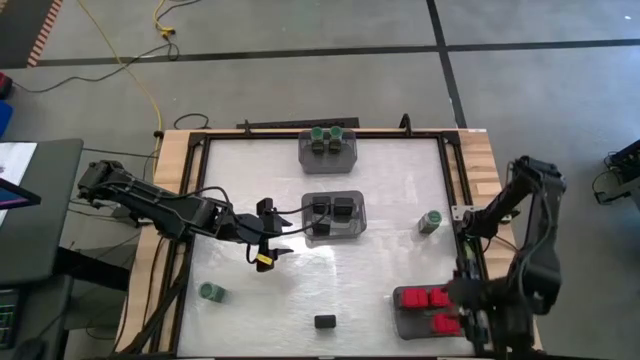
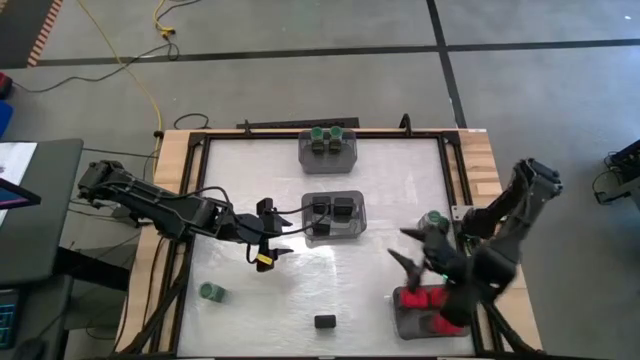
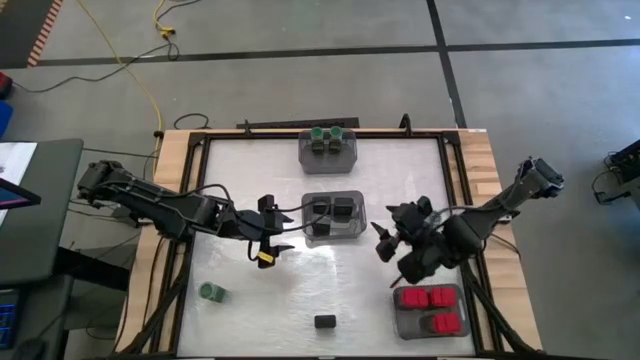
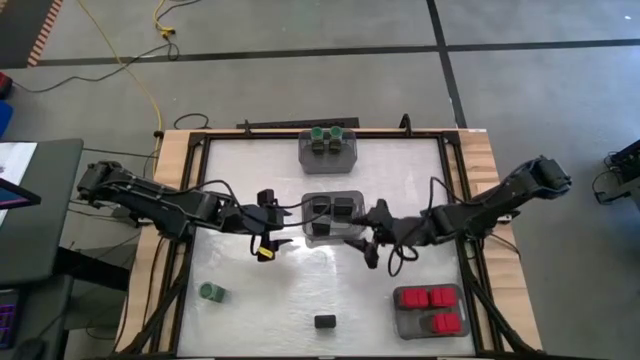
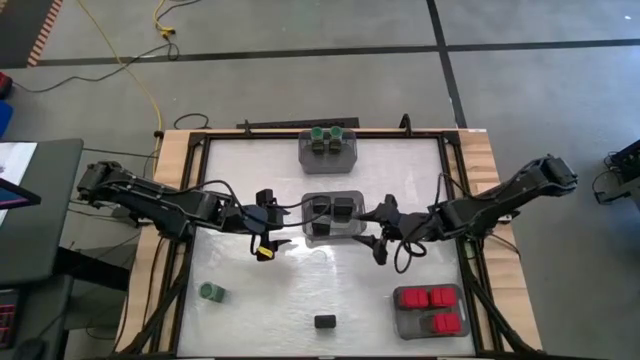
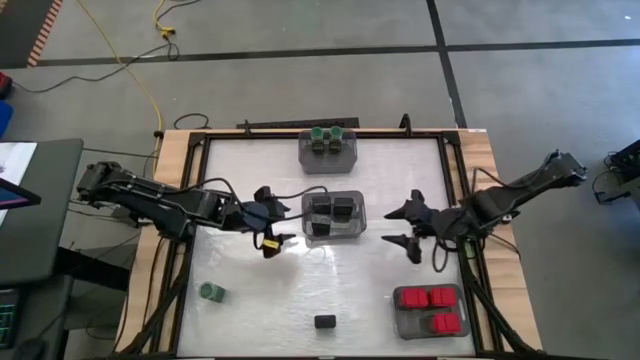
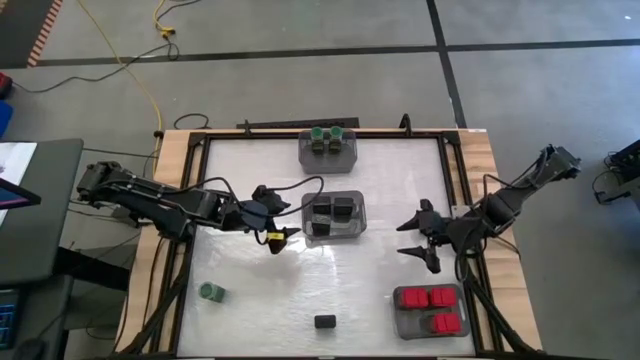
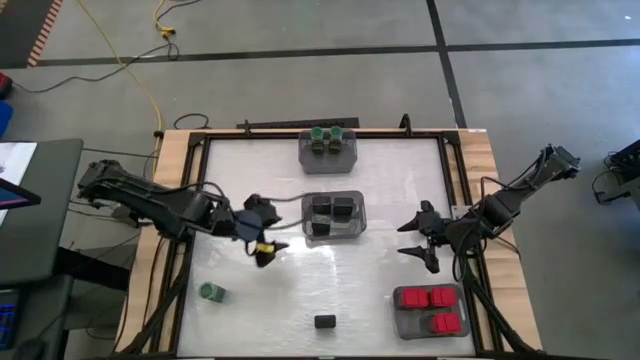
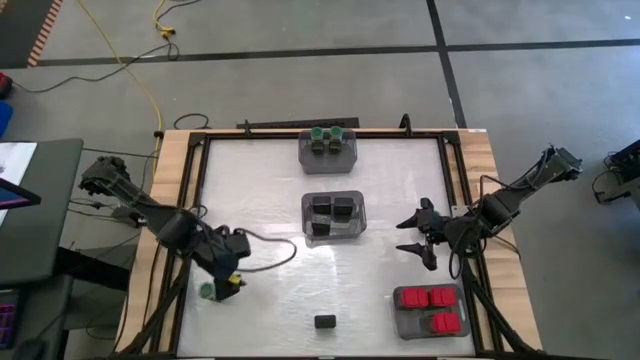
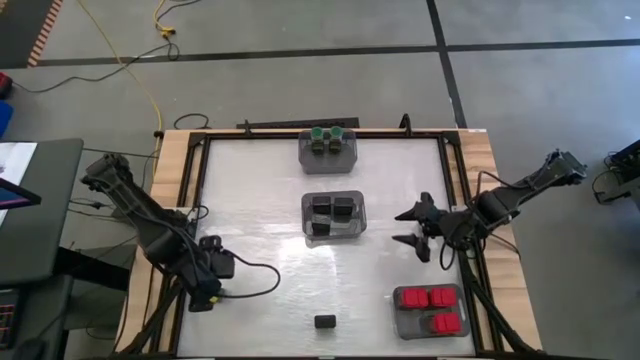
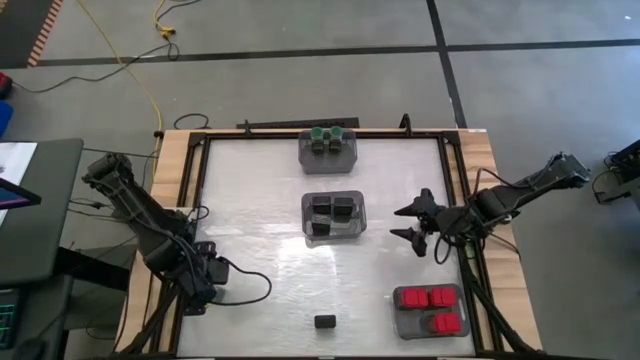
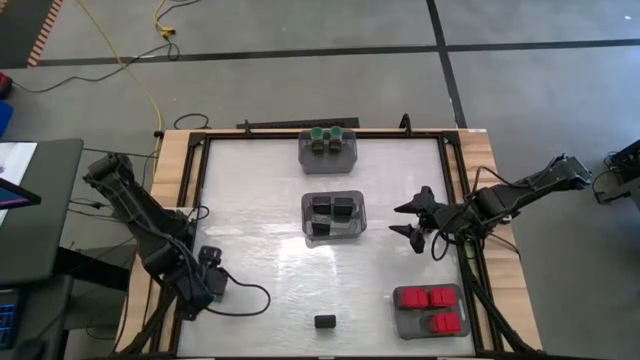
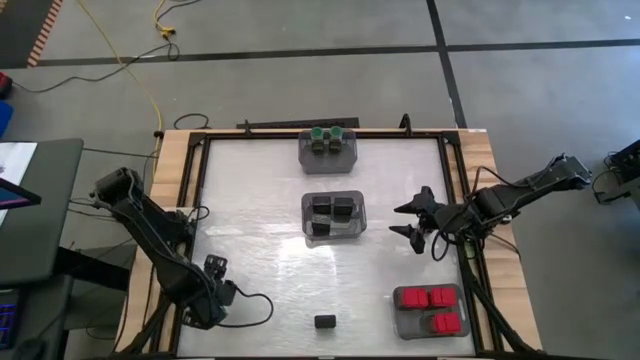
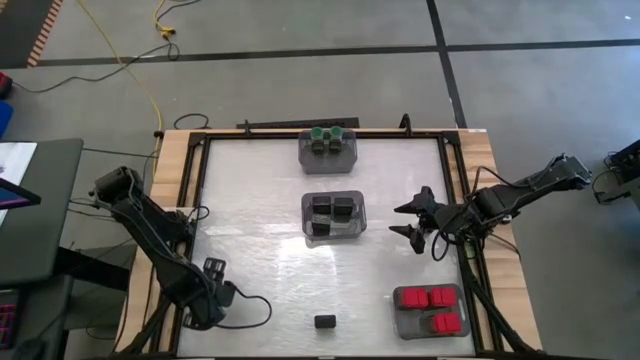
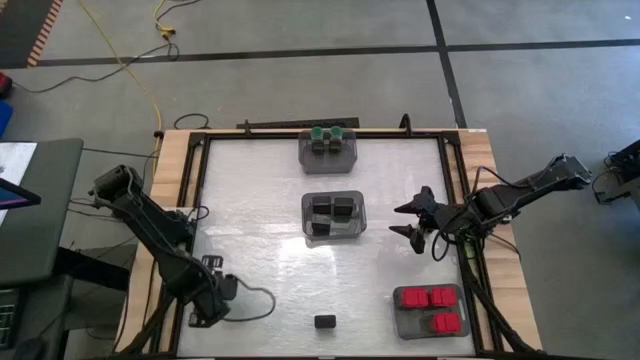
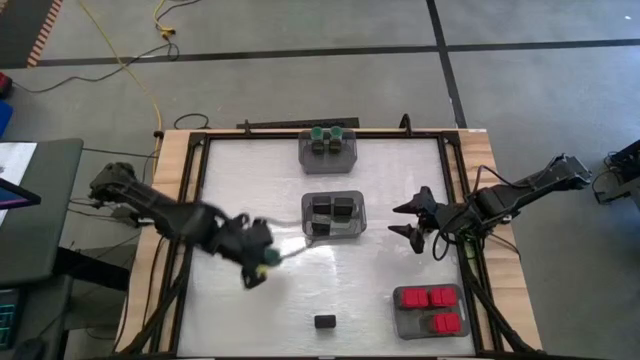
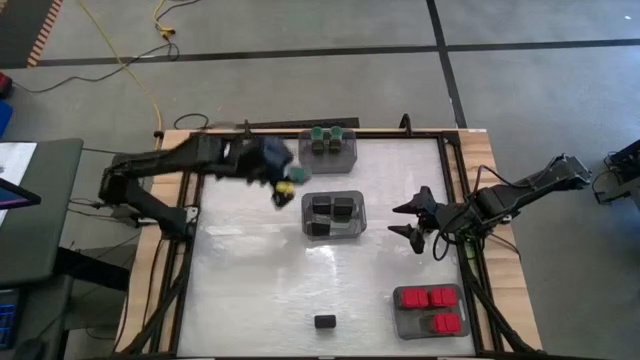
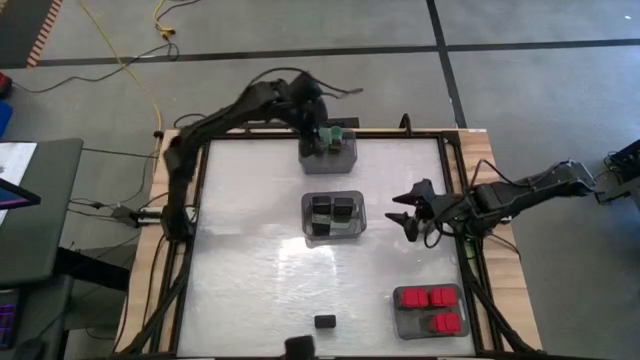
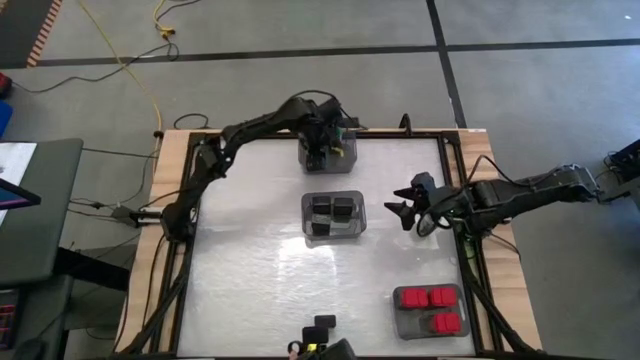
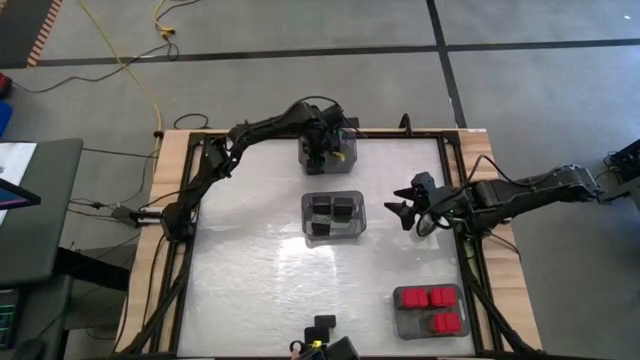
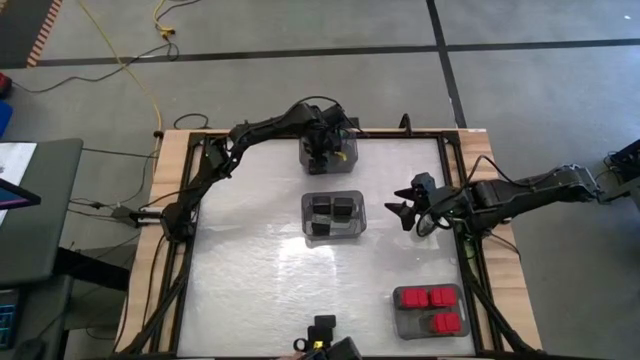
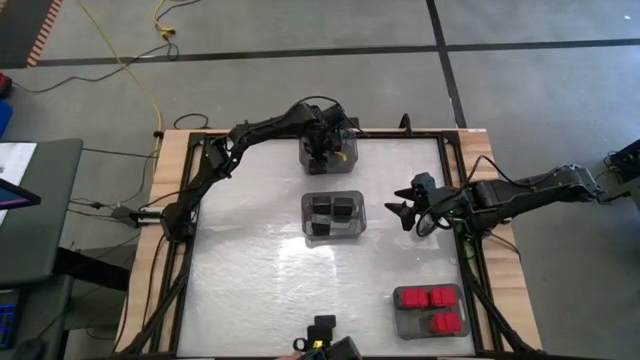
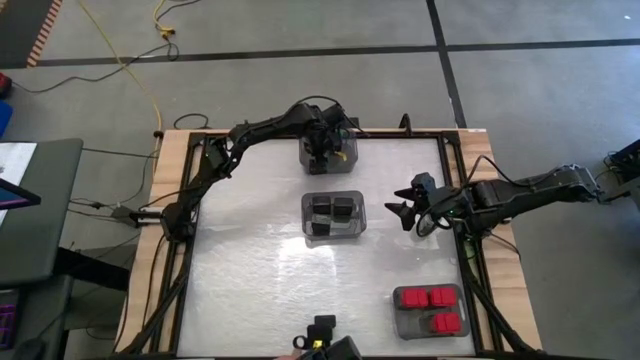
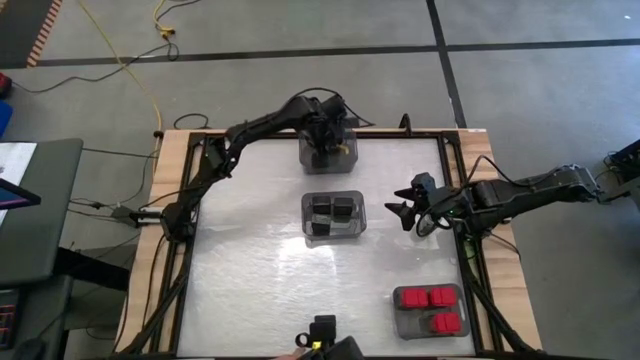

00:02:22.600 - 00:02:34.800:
Task: Sort spices by type
Put the green seasoning bottle into the top black bin

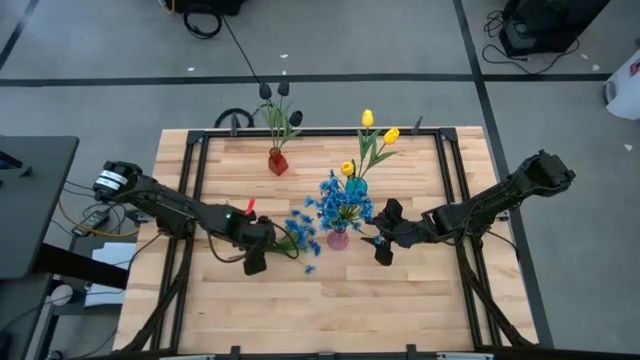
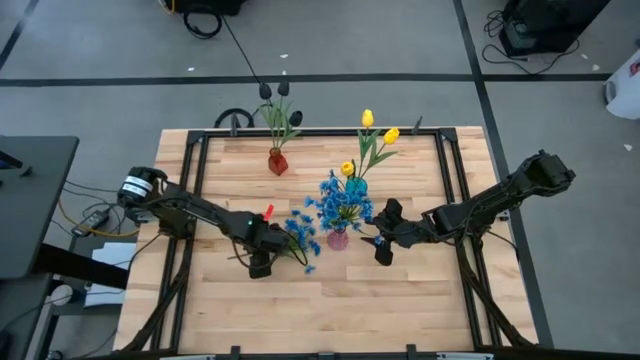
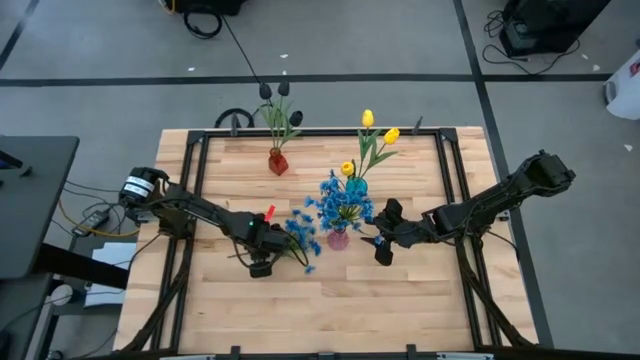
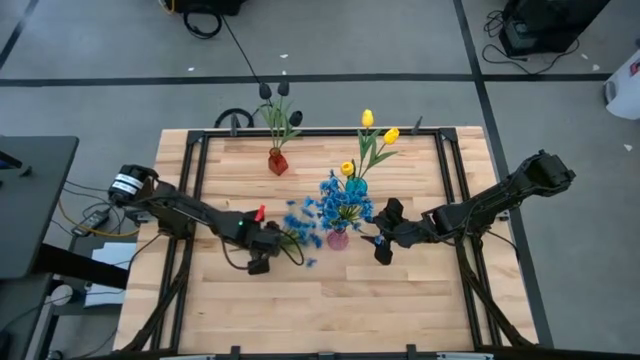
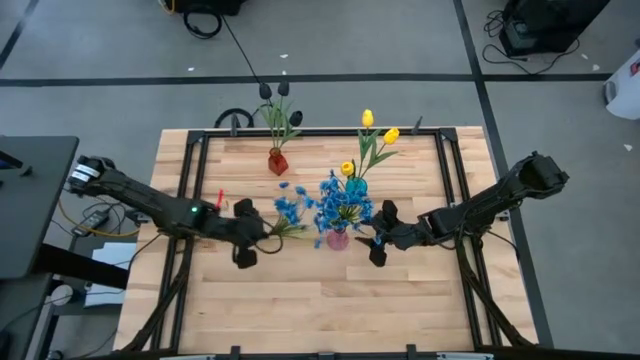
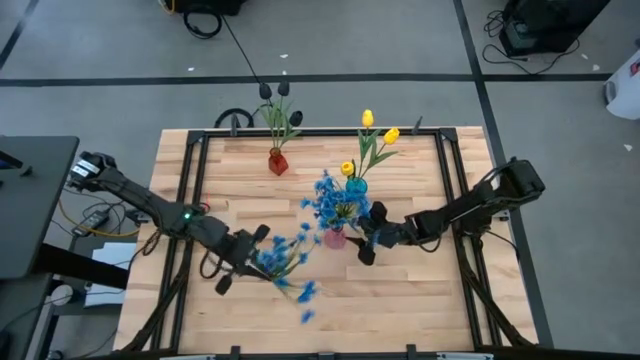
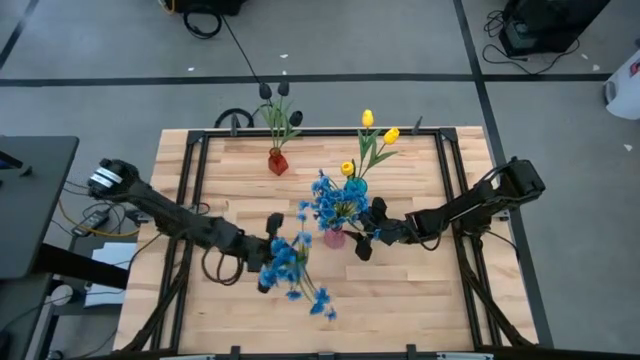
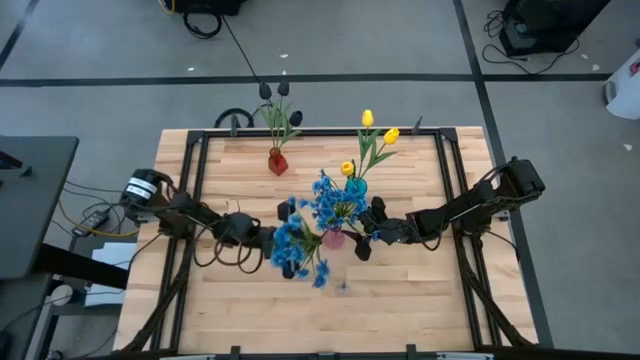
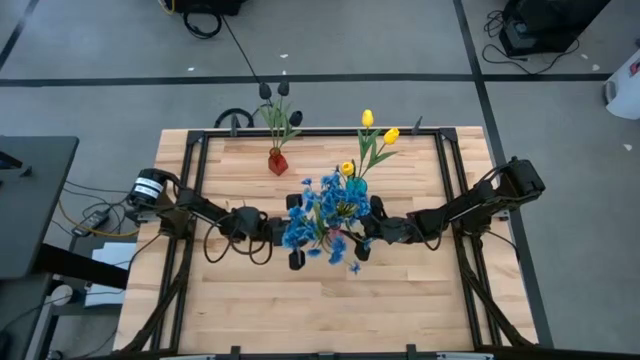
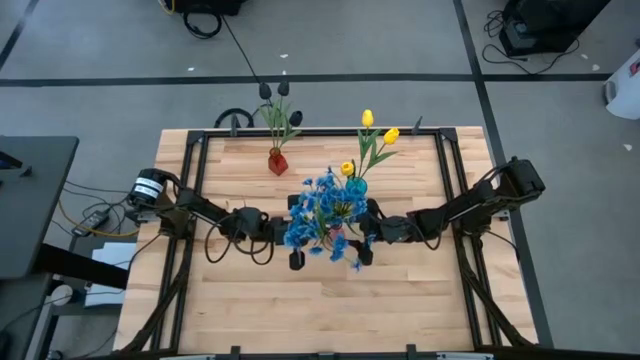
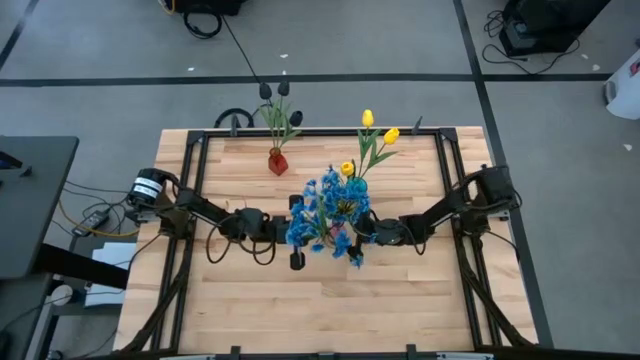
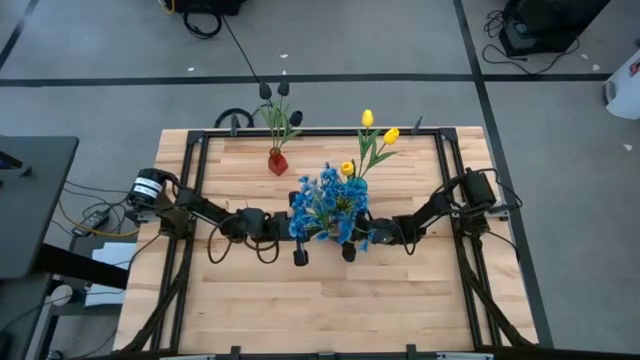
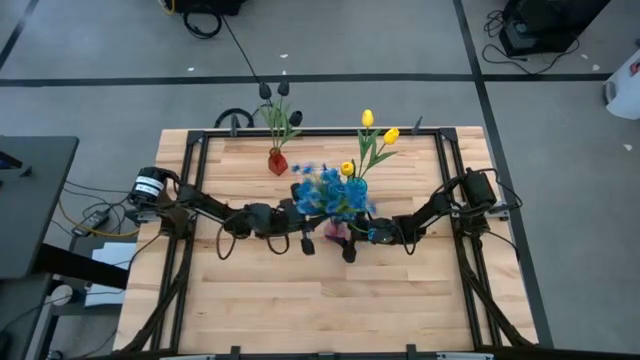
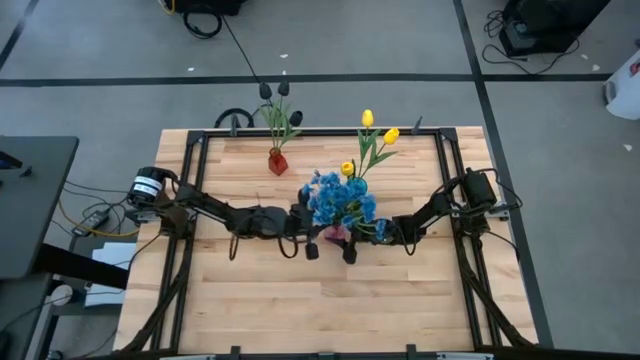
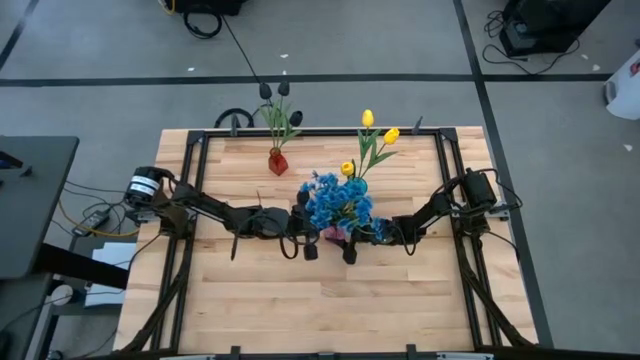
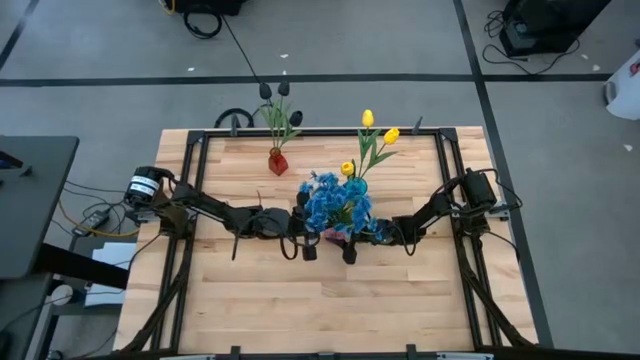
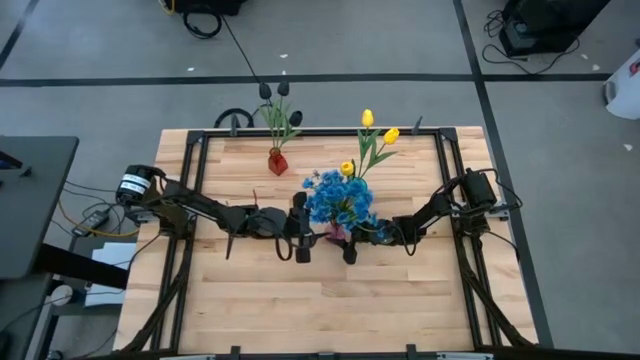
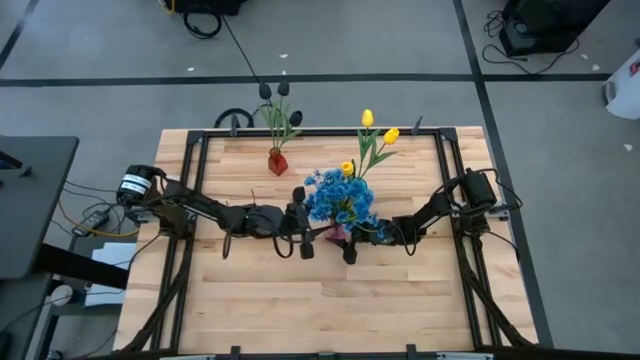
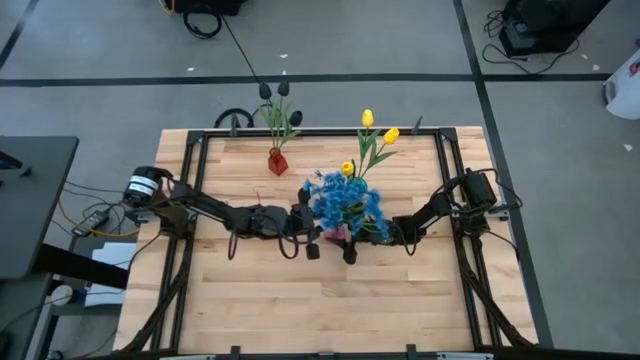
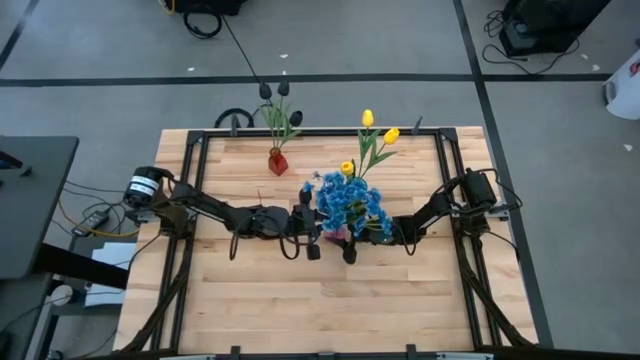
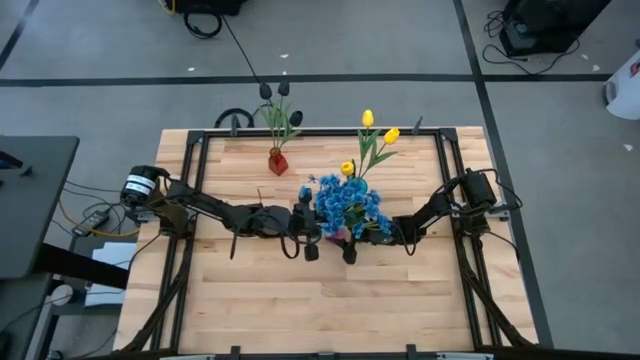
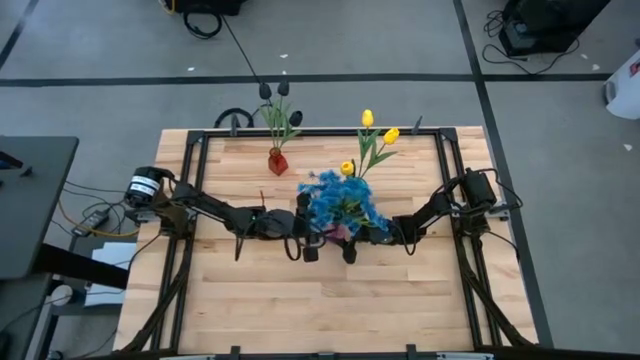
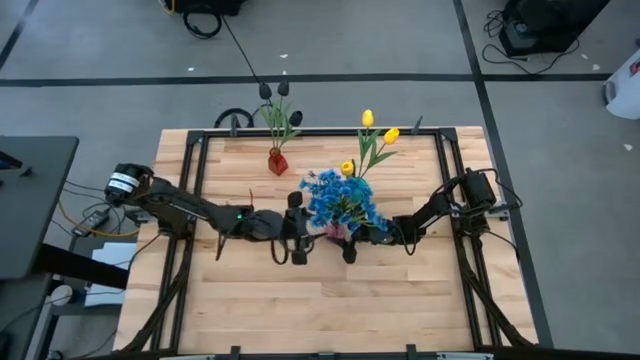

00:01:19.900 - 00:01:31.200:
Task: Sort flowers into vase by color
Put the blue flowers into the violet vase
